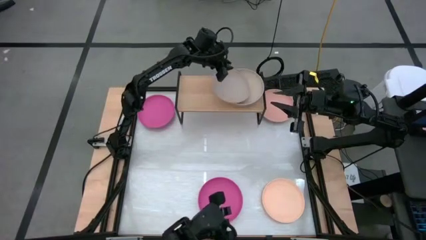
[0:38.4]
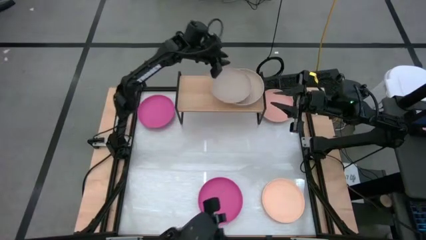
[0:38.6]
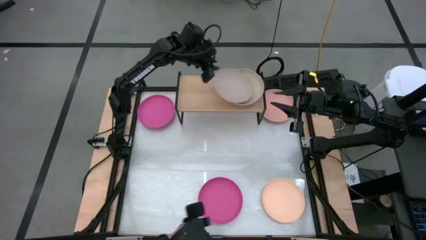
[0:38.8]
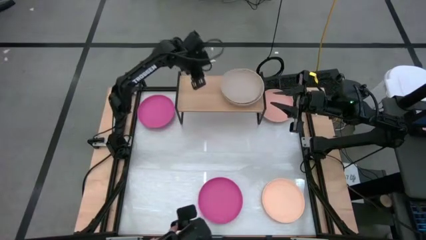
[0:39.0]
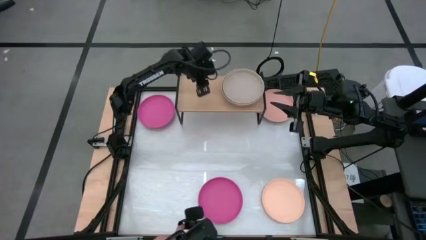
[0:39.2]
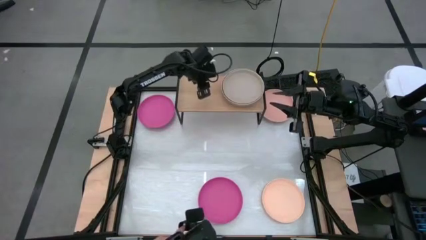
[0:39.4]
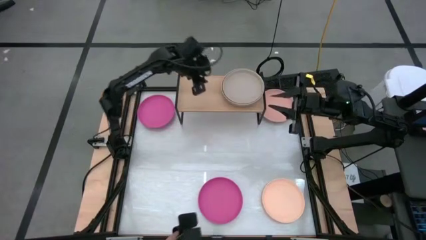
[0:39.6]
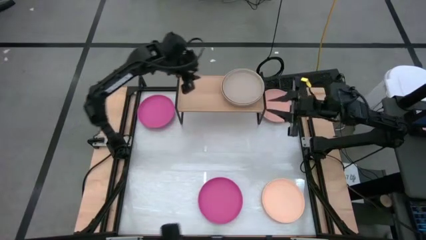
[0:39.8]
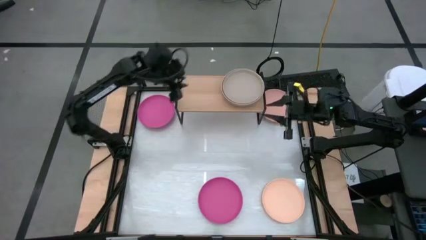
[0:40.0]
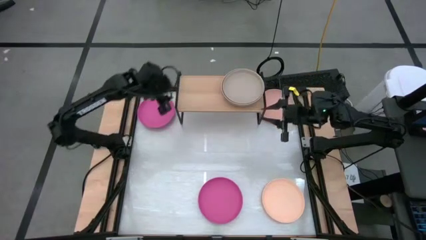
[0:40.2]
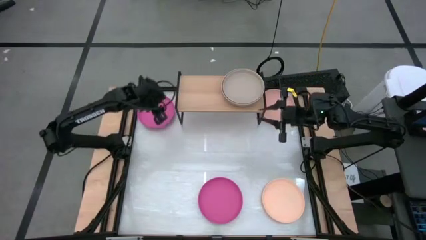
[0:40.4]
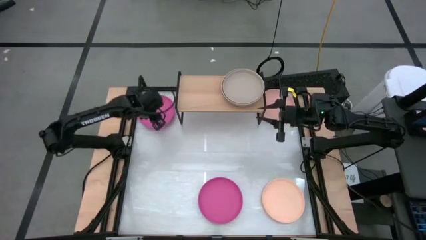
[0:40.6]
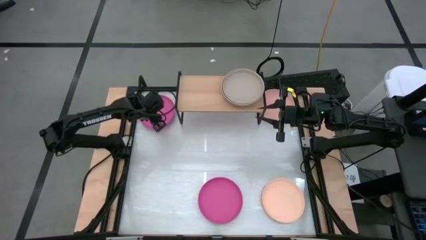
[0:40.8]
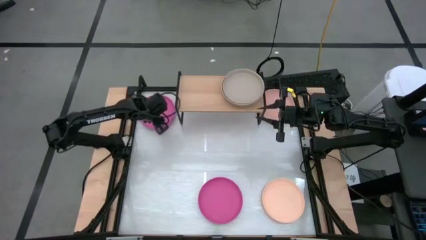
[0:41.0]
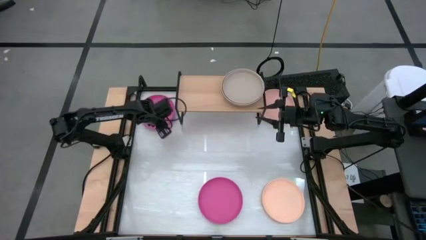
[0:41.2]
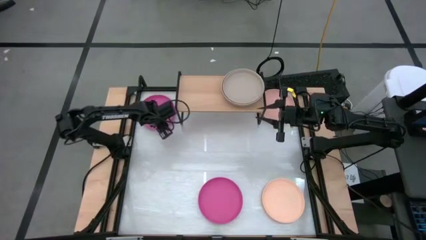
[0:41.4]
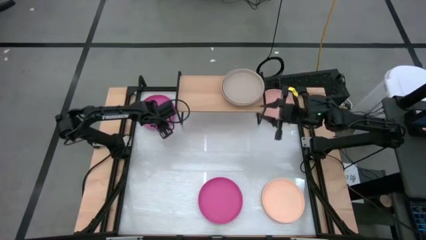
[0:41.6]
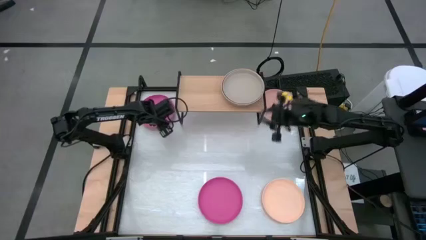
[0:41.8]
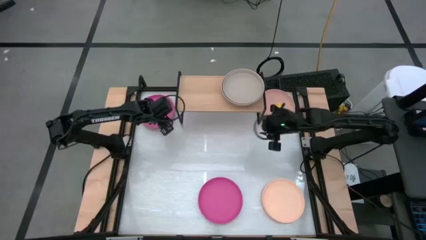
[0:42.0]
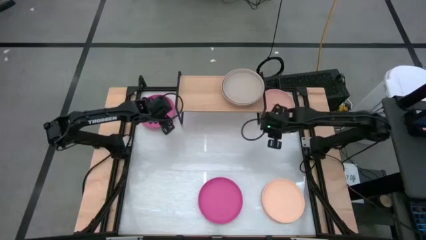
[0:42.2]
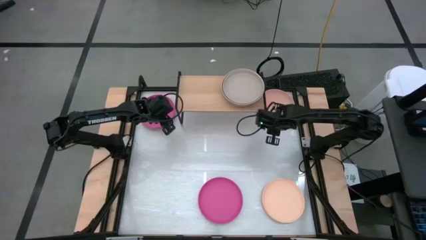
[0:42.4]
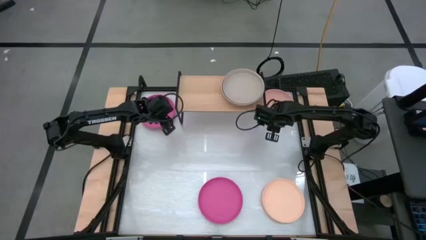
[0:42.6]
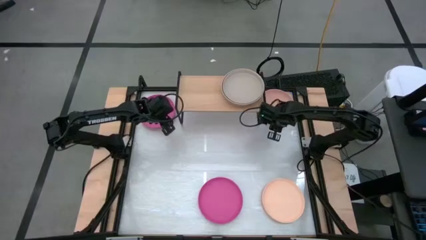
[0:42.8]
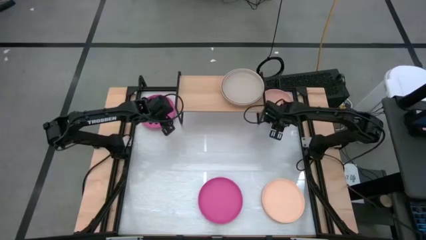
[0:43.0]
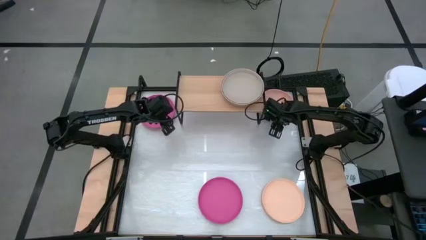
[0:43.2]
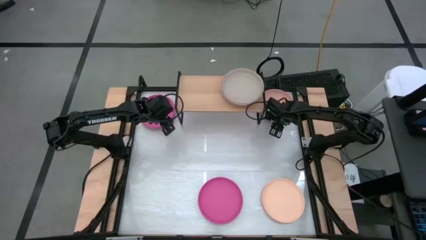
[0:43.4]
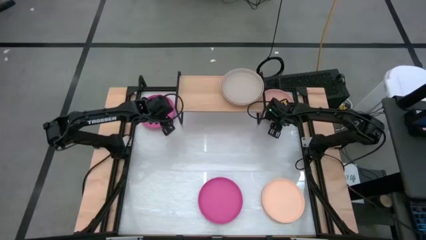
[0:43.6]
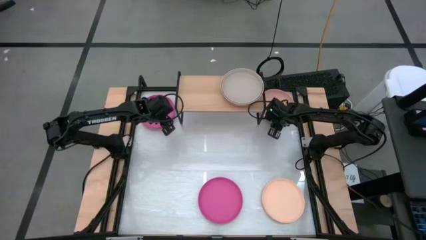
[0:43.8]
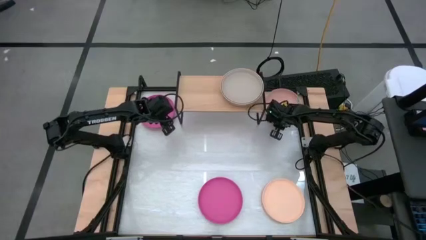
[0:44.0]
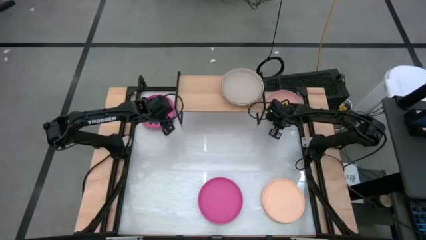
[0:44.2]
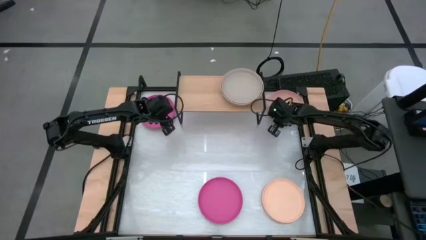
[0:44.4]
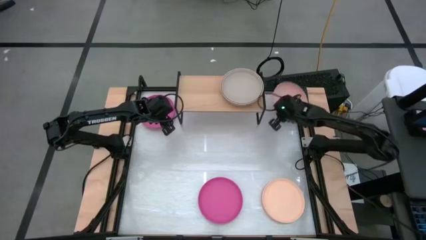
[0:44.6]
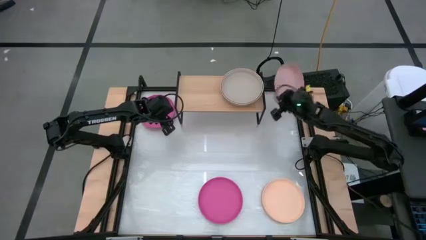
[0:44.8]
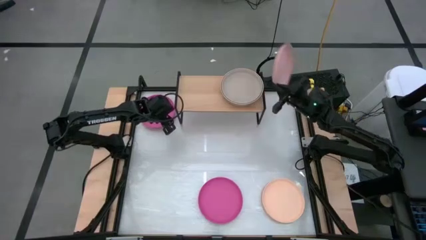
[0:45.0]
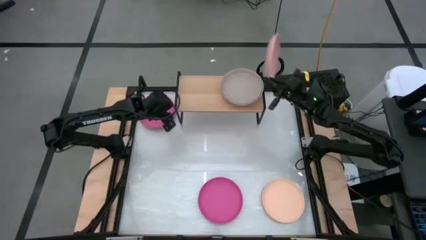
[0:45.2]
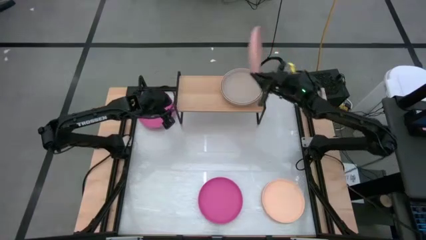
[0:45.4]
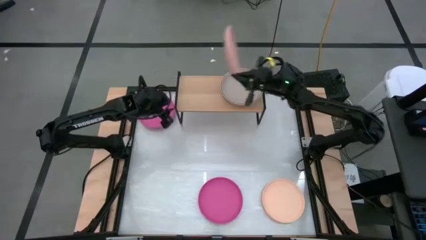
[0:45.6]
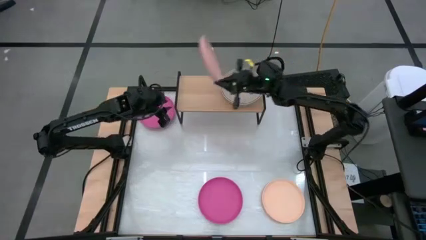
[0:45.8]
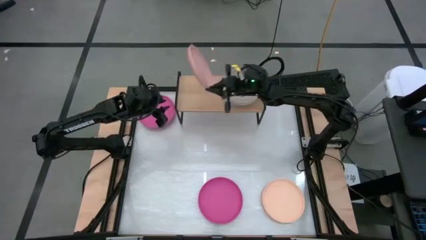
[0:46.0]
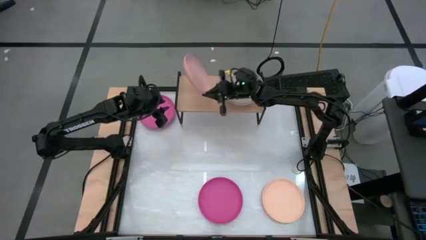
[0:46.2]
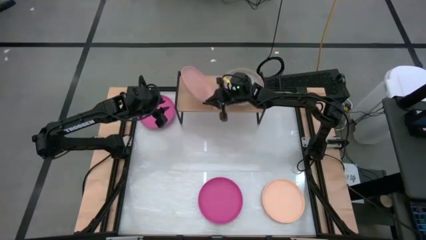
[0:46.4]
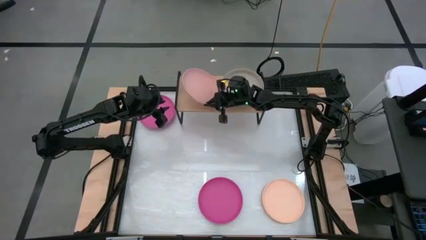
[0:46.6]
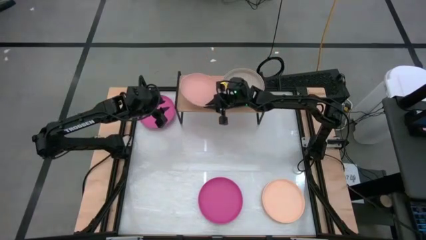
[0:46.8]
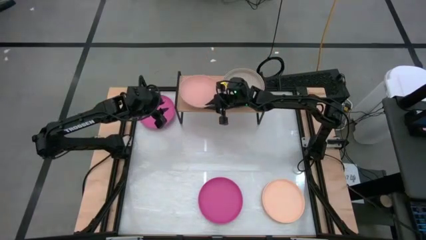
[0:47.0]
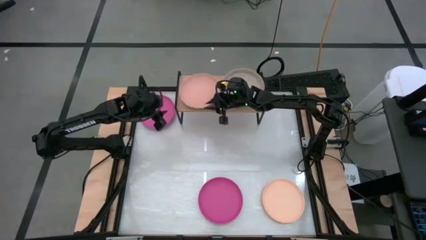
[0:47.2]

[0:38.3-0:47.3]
Task: Place and stack plates onto a shelf
Put the light pink plate on the shelf

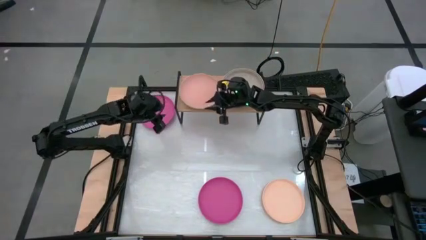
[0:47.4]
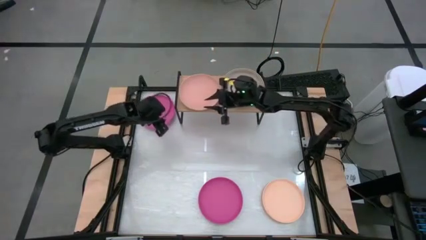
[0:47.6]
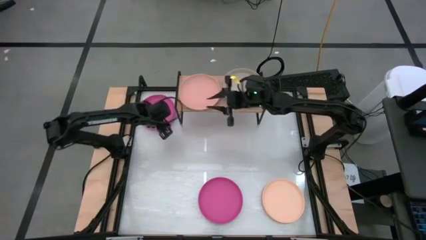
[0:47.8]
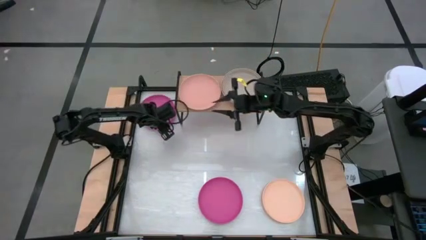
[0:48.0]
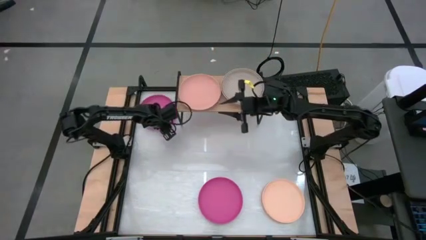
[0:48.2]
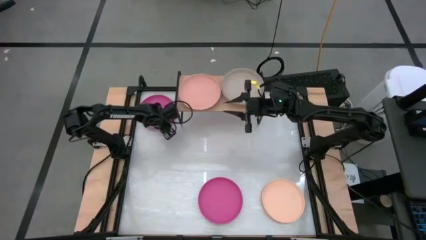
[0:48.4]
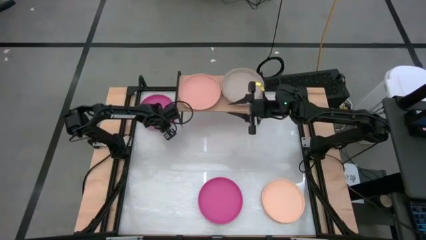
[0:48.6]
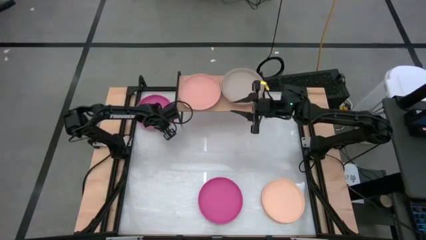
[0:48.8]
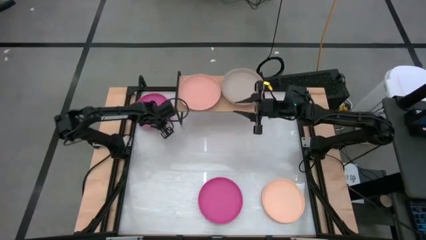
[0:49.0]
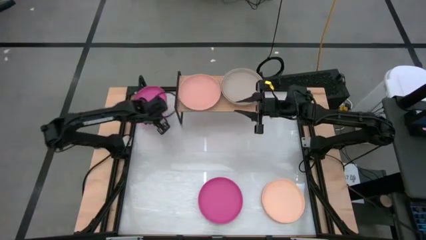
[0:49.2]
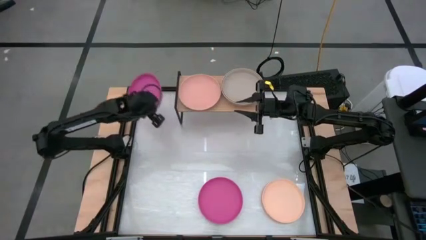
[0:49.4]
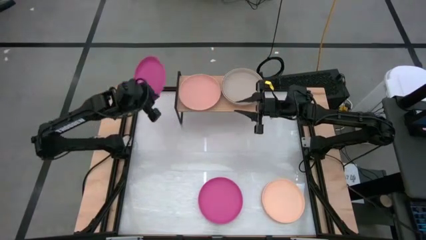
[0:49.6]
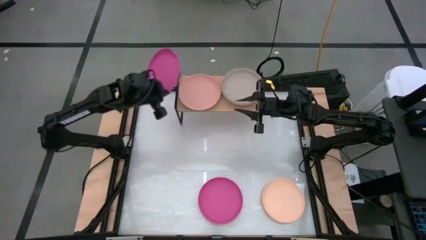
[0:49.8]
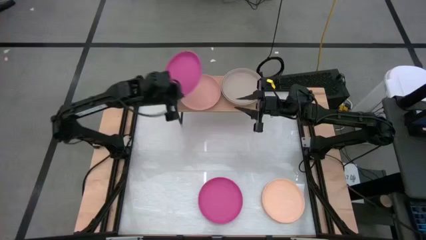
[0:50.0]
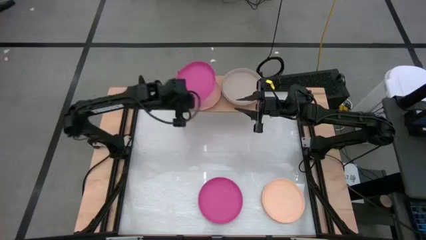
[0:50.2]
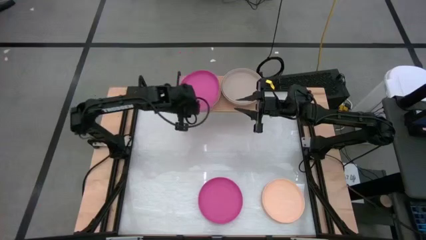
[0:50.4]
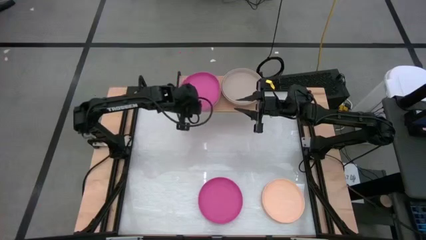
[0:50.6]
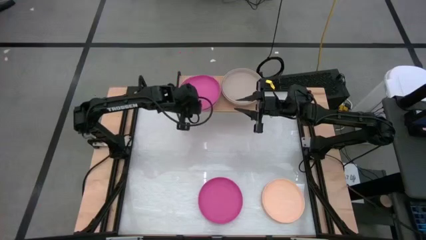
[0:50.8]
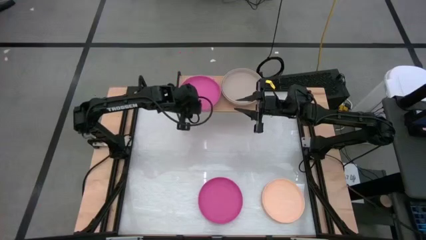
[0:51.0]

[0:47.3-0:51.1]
Stack the top pink plate on top of the light pink plate on the shelf

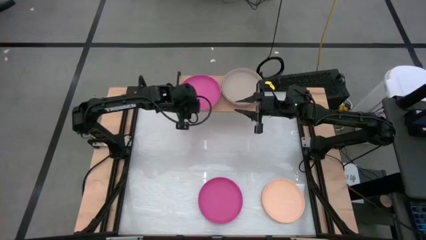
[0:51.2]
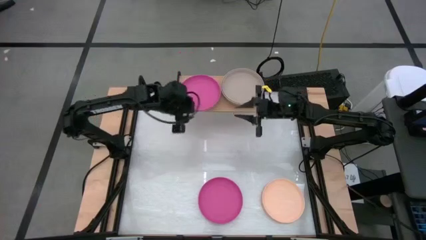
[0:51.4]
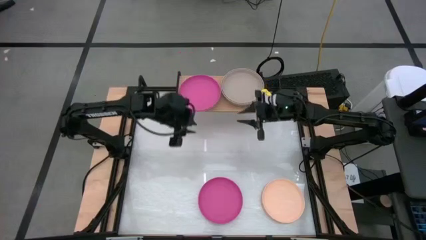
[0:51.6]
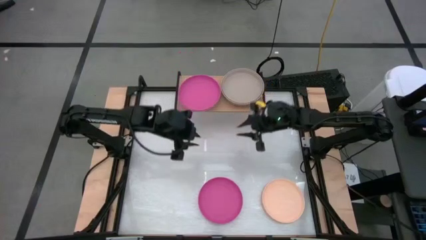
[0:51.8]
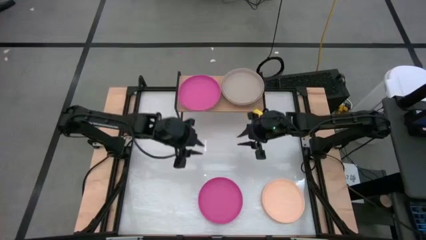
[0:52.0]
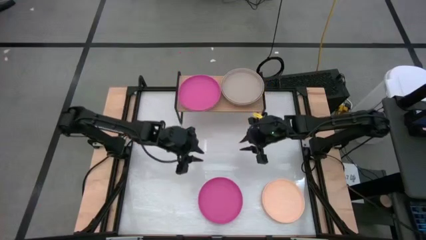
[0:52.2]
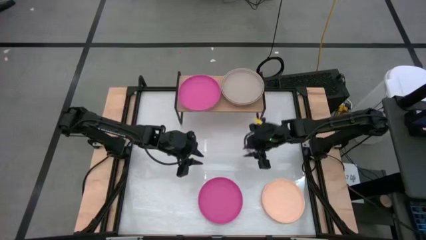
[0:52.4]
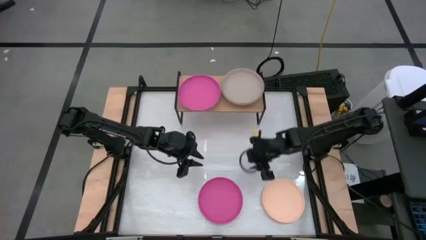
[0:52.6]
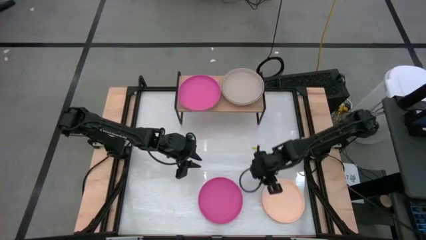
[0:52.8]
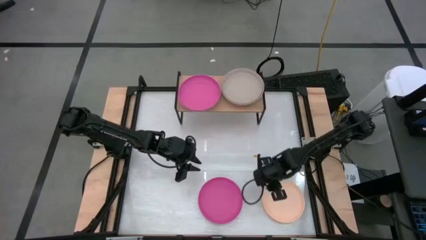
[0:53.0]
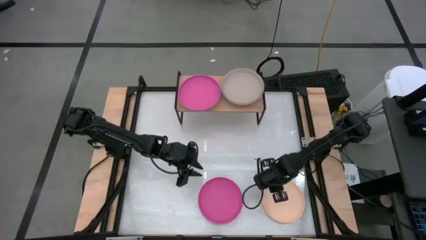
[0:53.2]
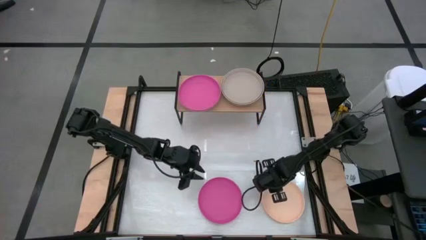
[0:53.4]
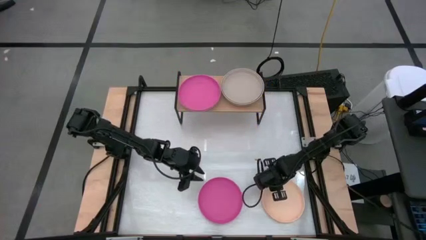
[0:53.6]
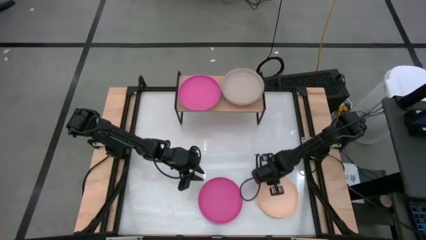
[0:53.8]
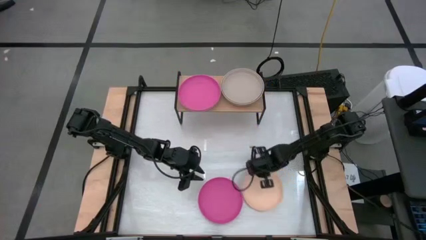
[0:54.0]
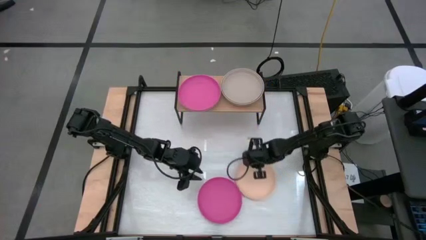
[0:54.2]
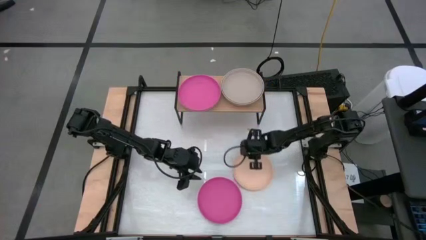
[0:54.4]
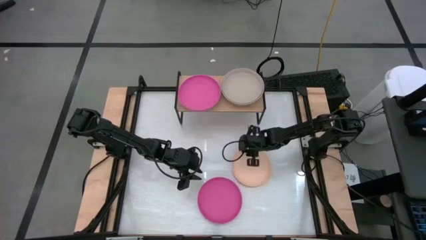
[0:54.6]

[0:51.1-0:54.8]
Move the light orange plate to the middle right of the table

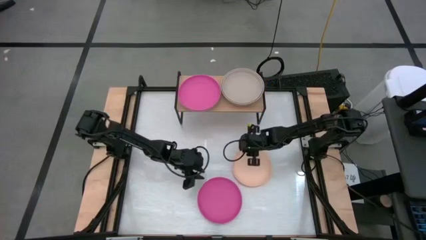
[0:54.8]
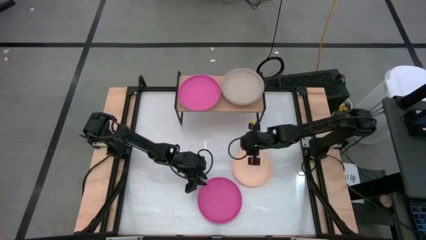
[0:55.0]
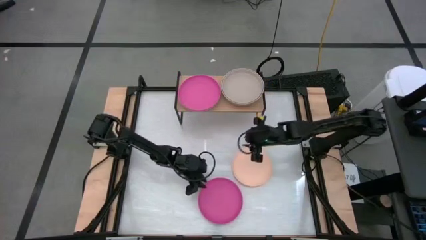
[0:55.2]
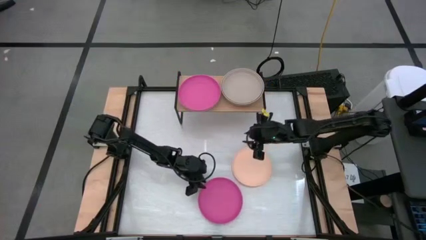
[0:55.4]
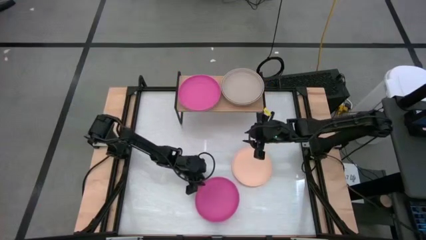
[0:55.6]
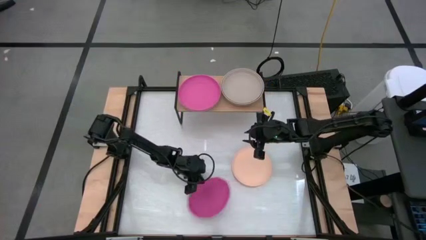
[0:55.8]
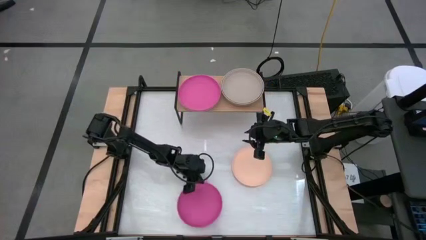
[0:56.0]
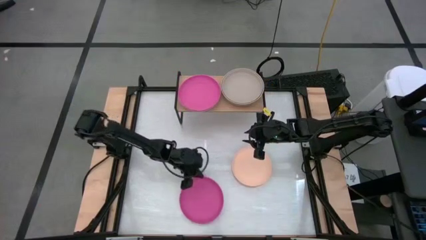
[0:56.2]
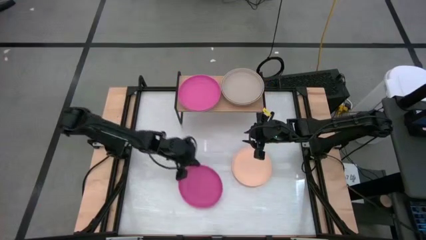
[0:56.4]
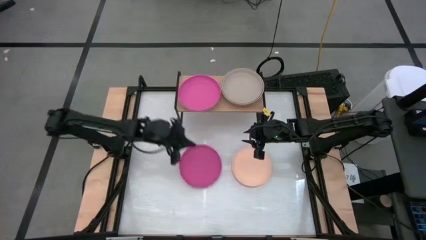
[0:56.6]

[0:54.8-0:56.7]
Stack the pink plate on top of the pink plate on the shelf
